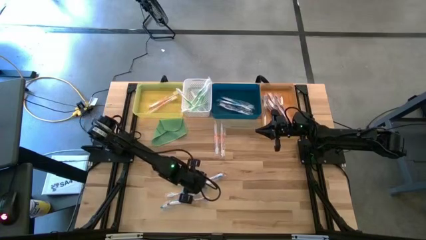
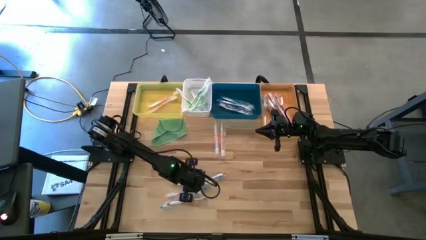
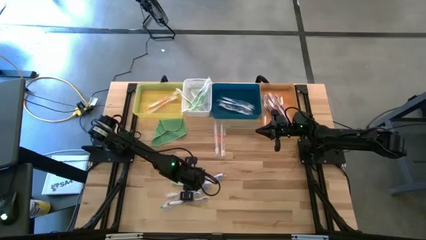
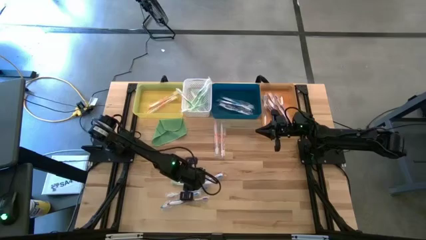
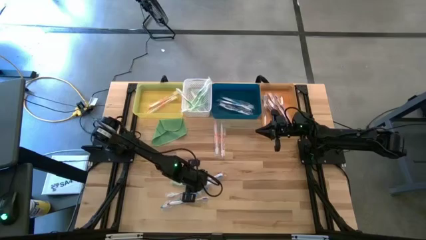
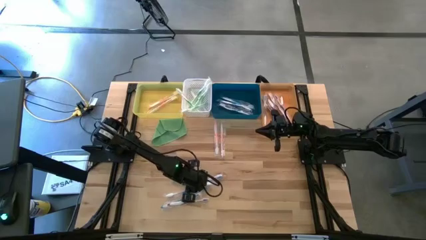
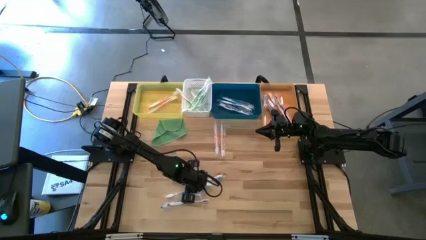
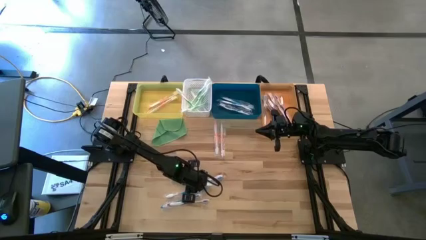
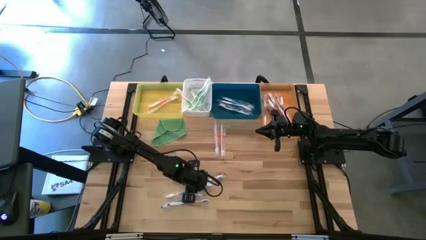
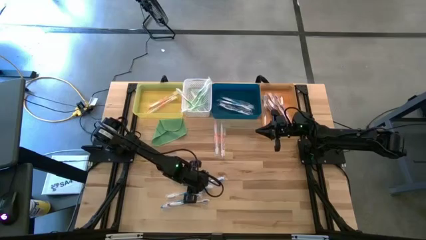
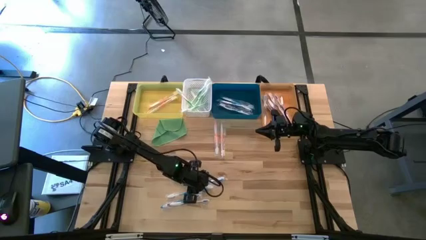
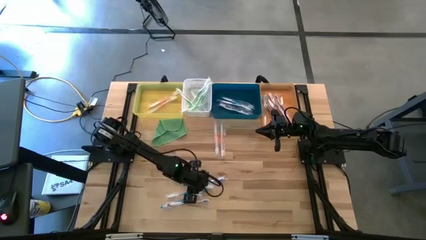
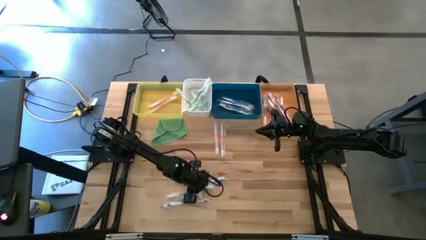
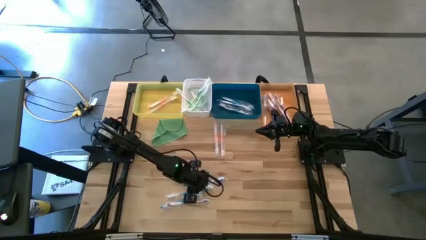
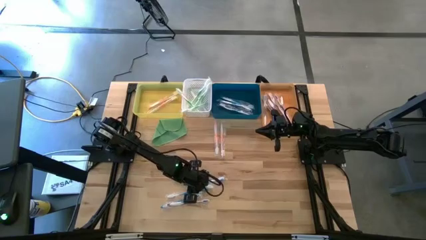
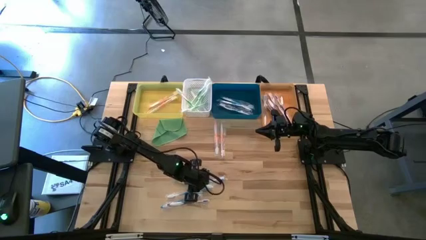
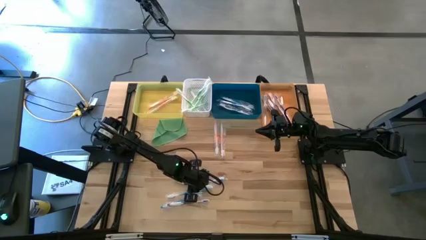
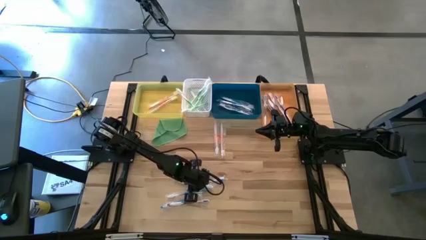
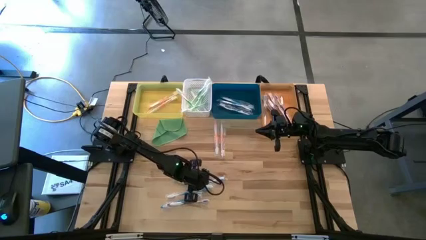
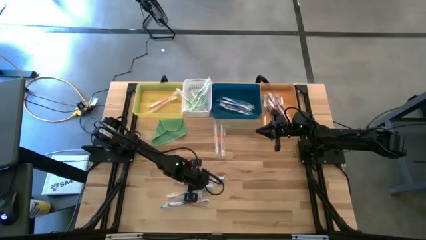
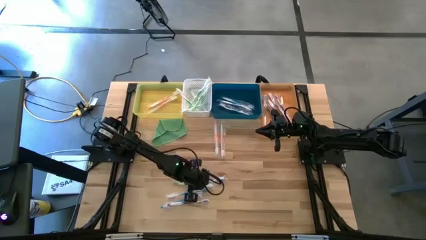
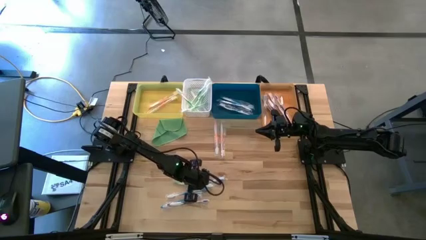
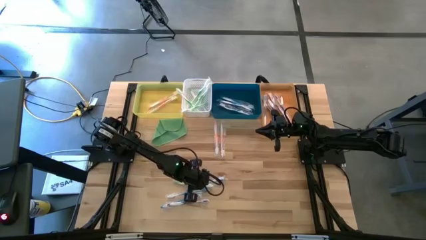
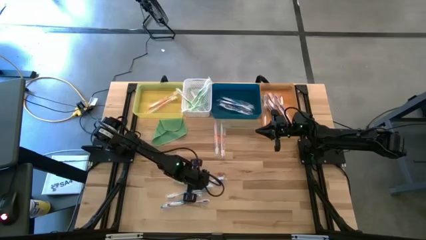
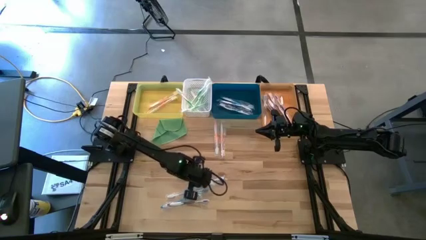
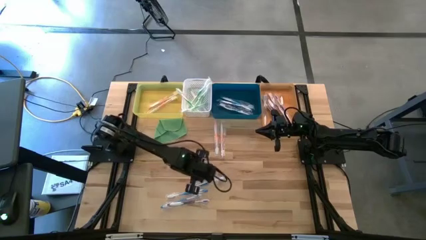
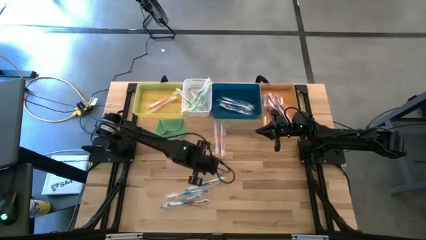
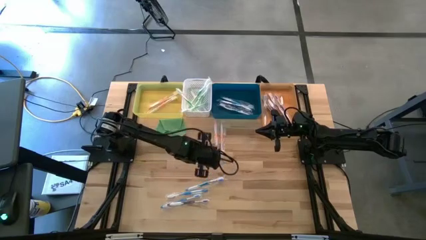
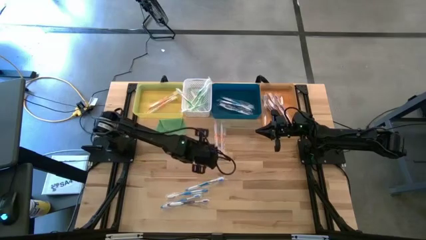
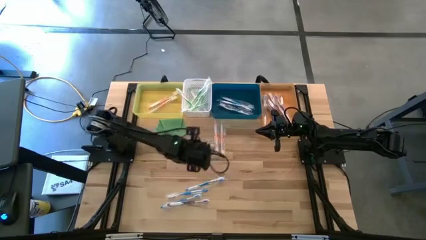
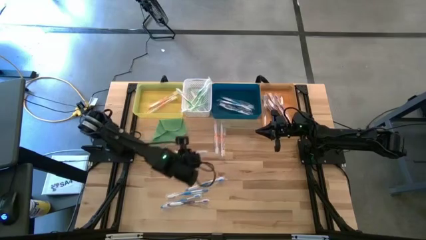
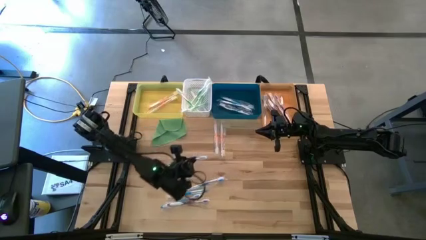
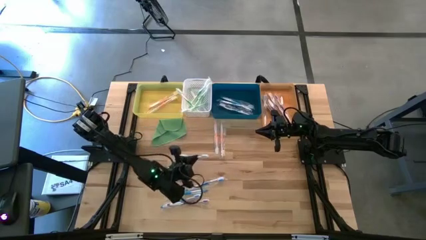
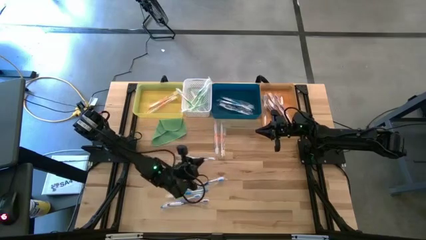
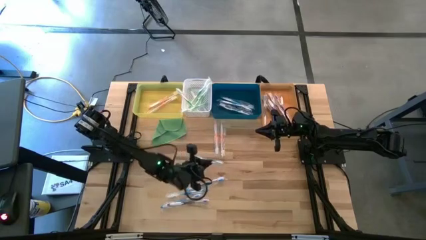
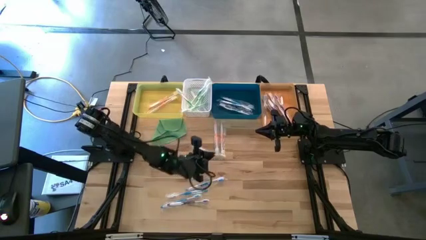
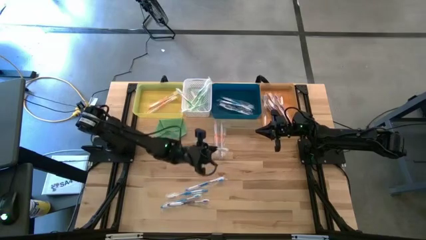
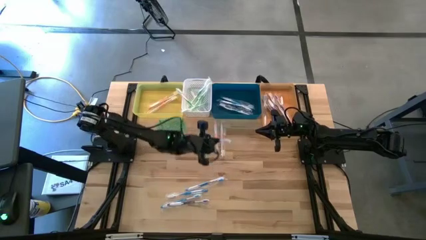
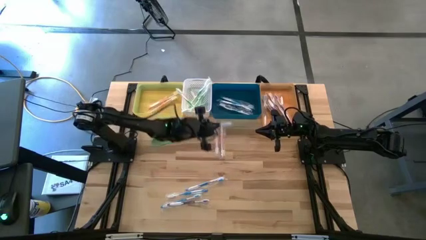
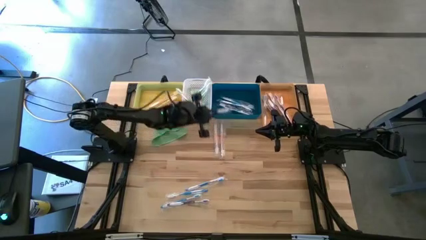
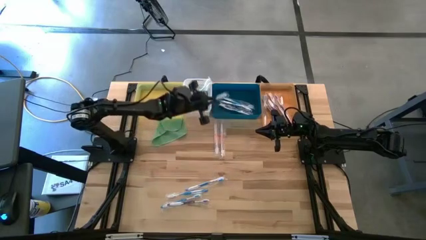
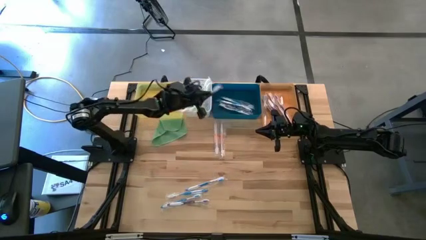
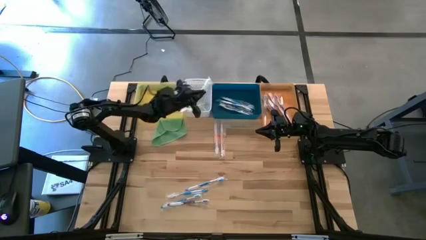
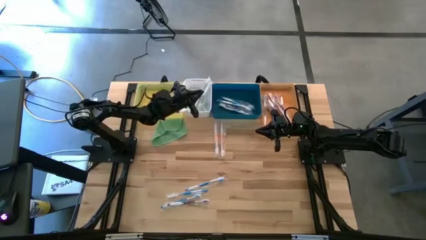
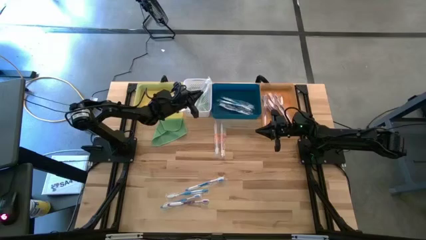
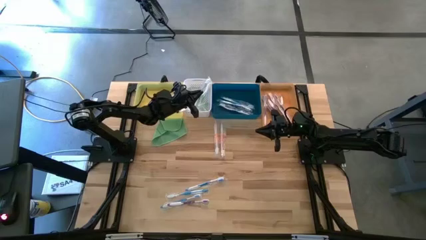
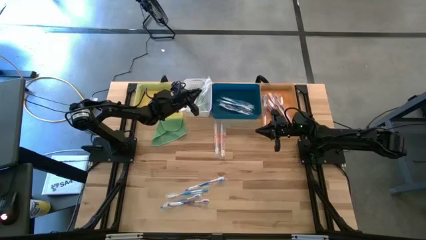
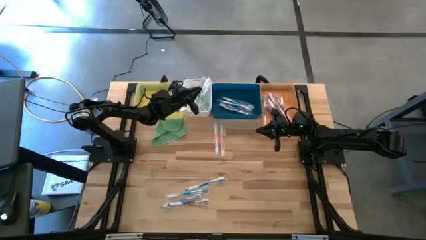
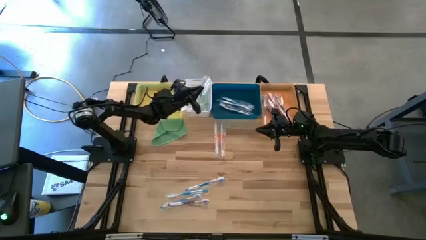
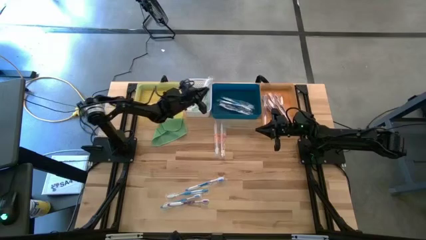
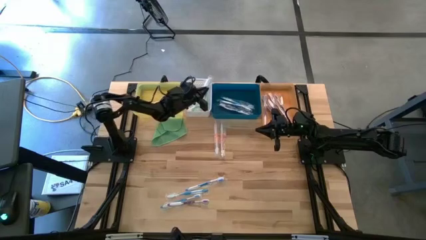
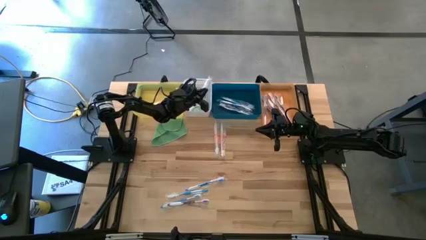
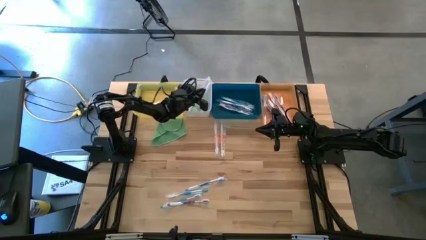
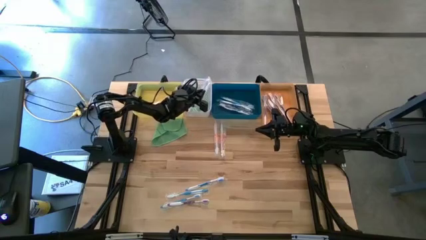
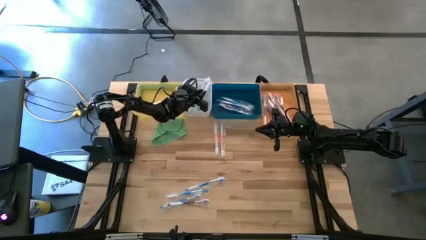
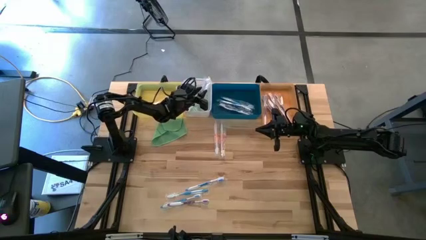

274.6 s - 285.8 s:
Task: Pick & Place Toothbrushes
Put the green toothbrush into the white bin

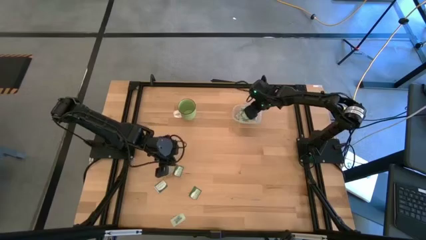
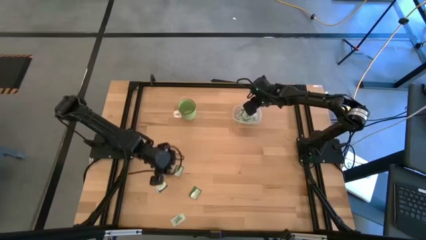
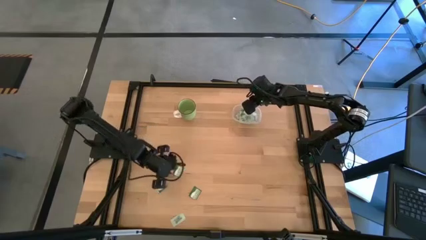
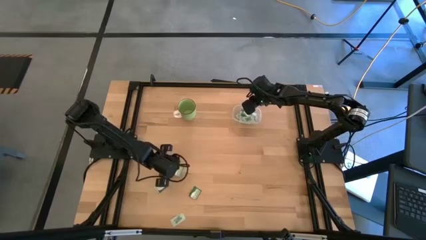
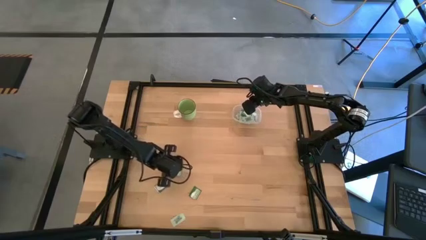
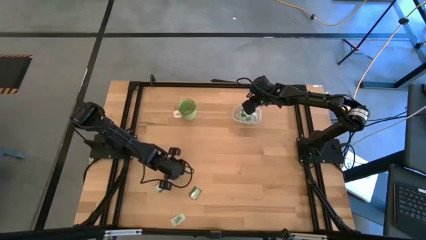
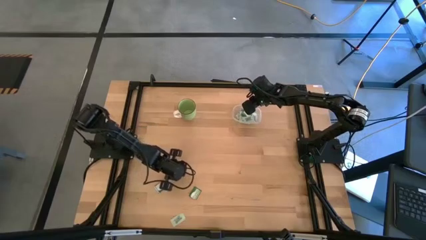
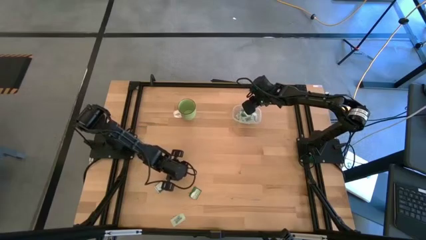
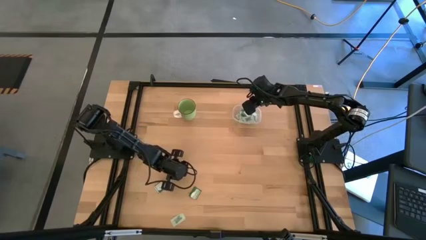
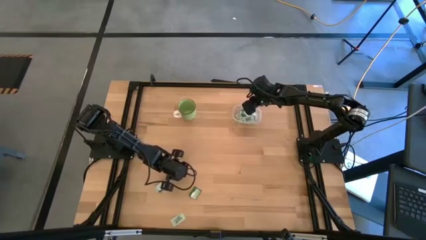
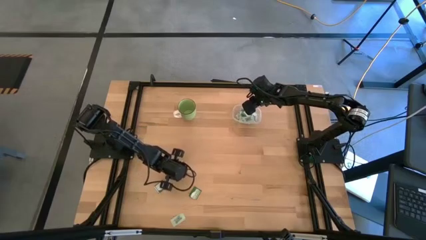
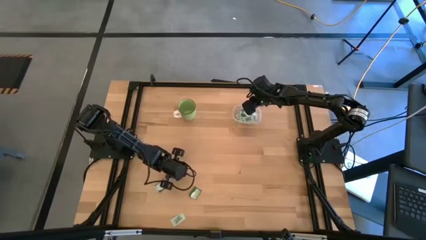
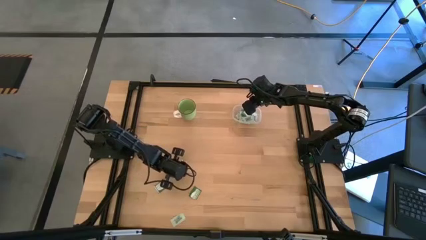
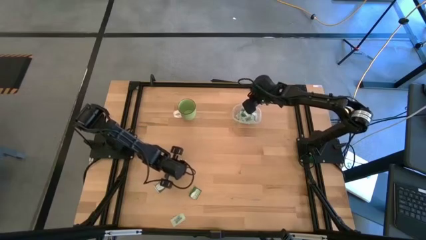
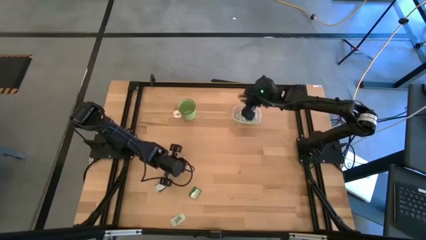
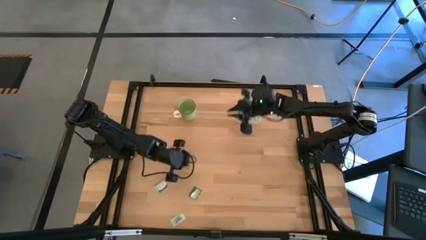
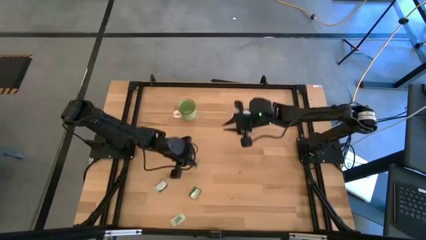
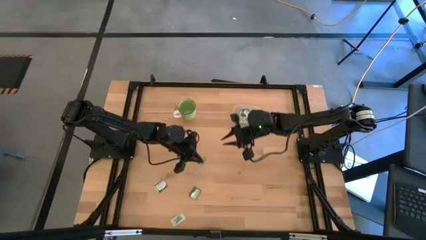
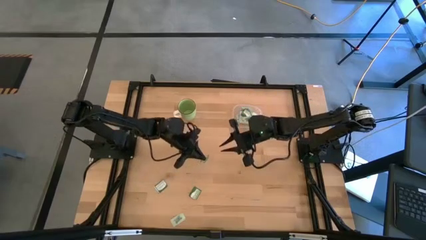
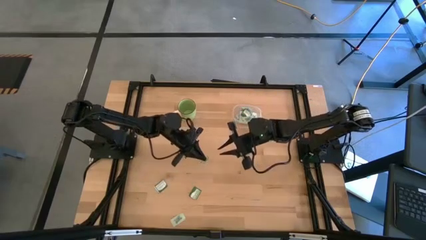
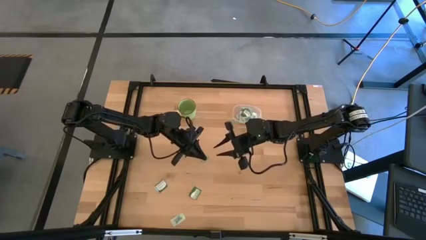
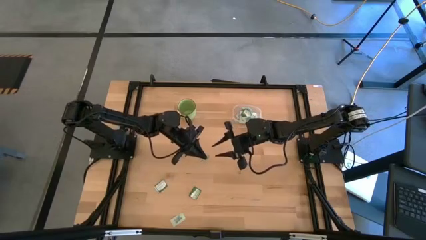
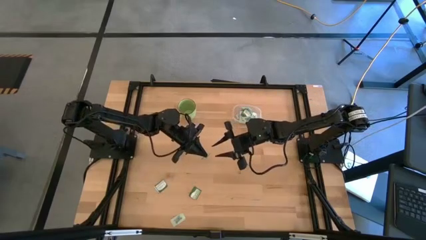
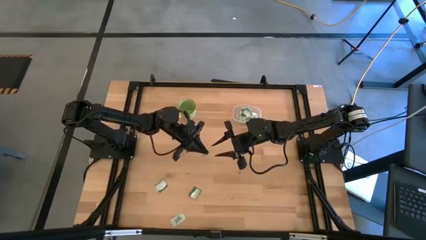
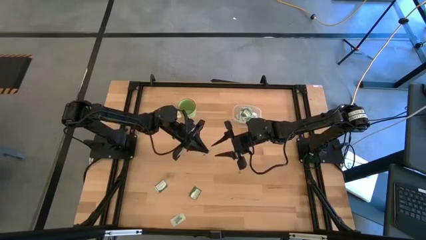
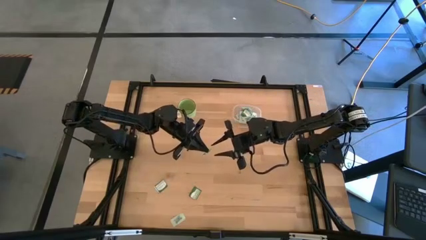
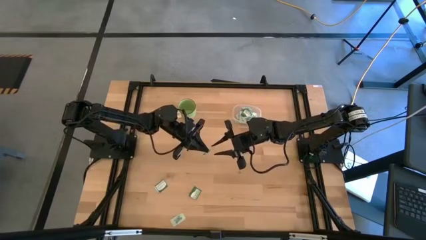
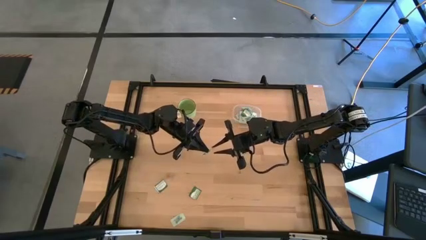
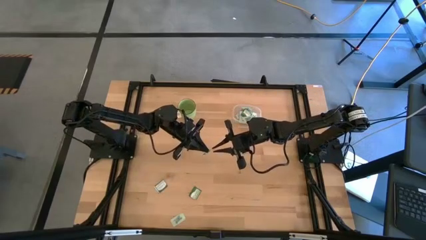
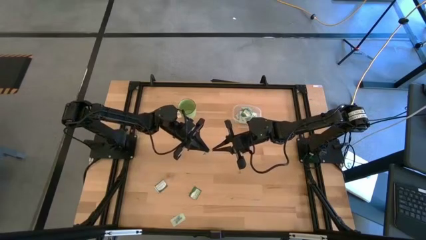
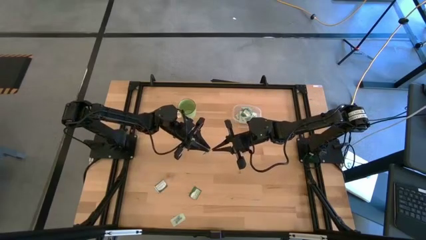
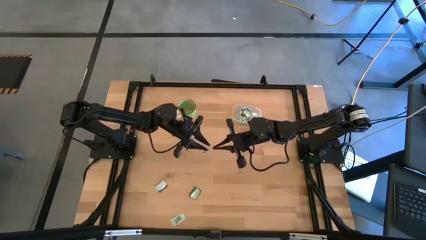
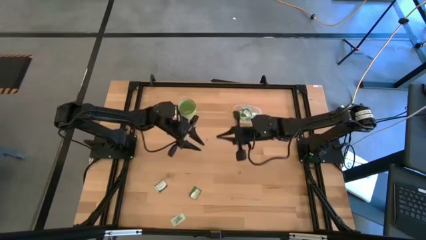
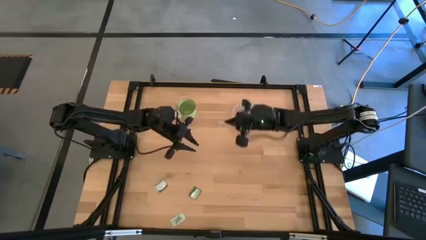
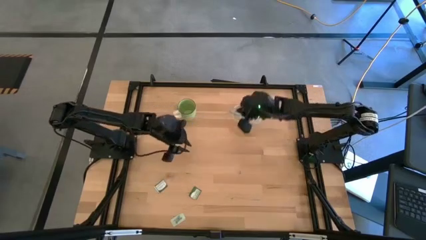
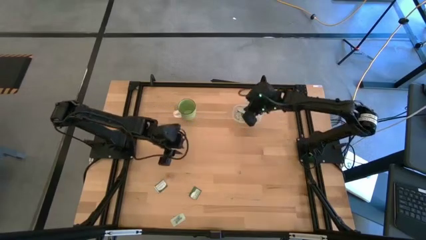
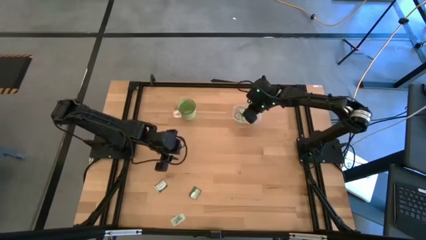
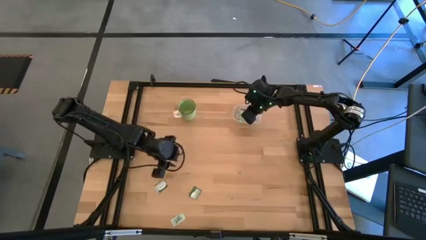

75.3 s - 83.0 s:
Task: Pick and place items into bin
Put the green truvia packet into the transparent bin
